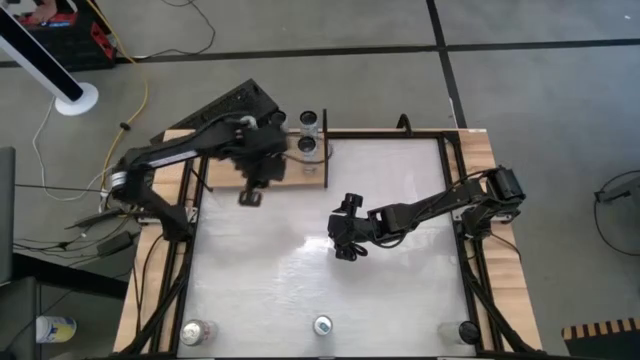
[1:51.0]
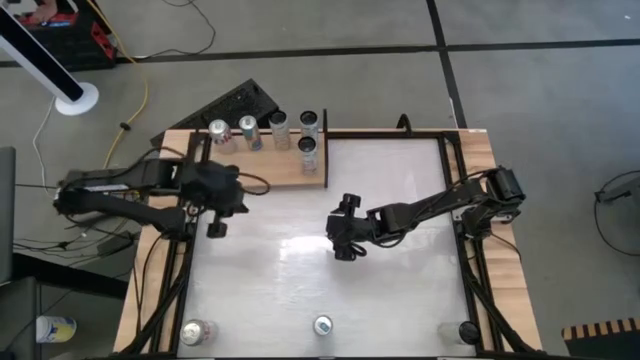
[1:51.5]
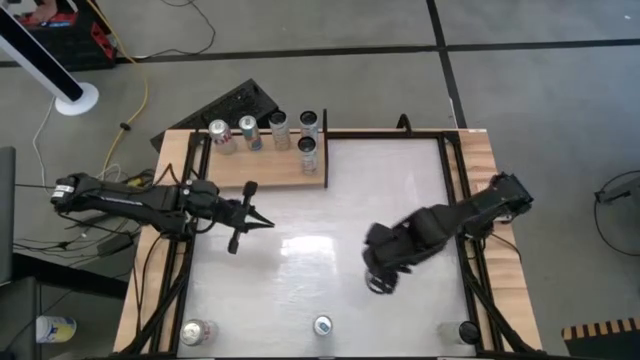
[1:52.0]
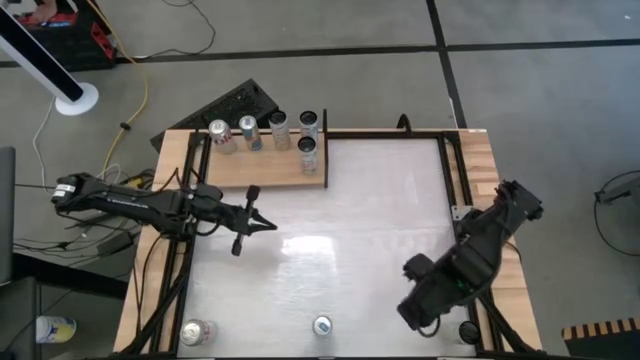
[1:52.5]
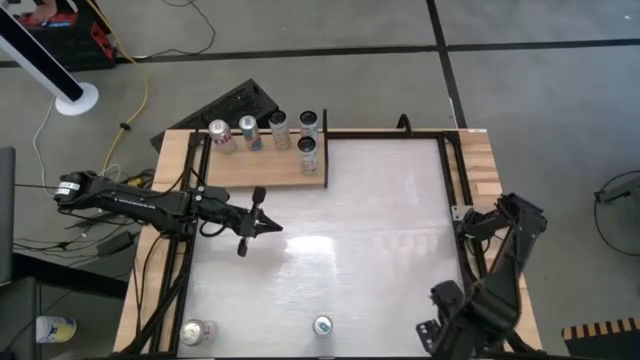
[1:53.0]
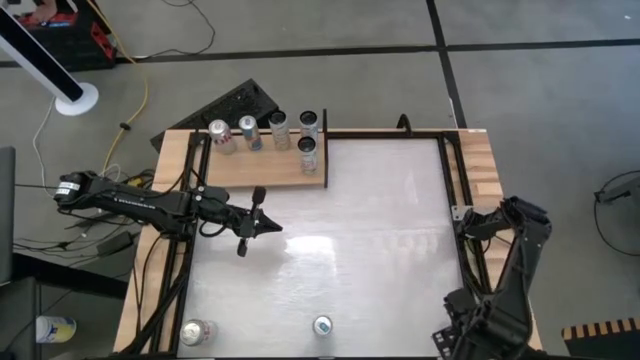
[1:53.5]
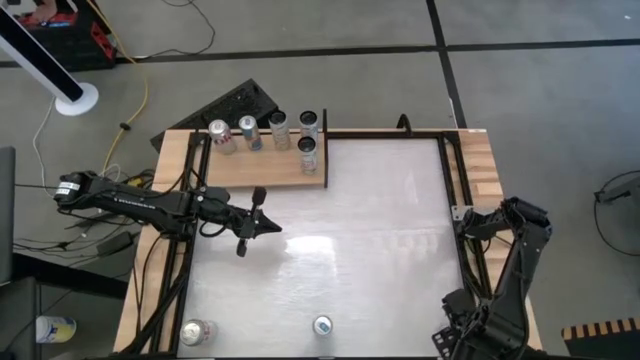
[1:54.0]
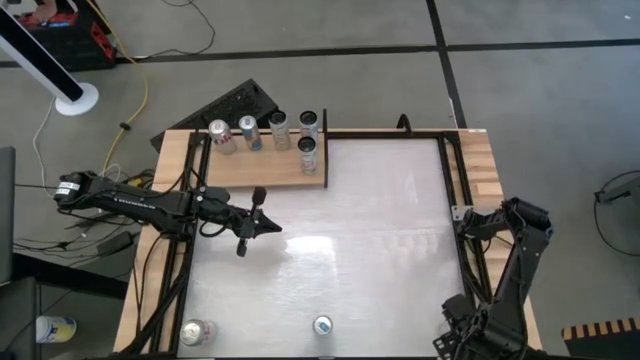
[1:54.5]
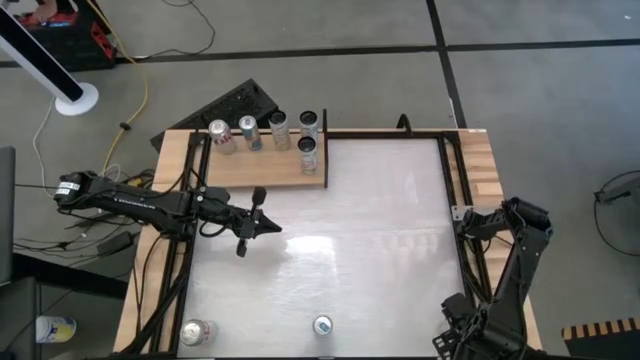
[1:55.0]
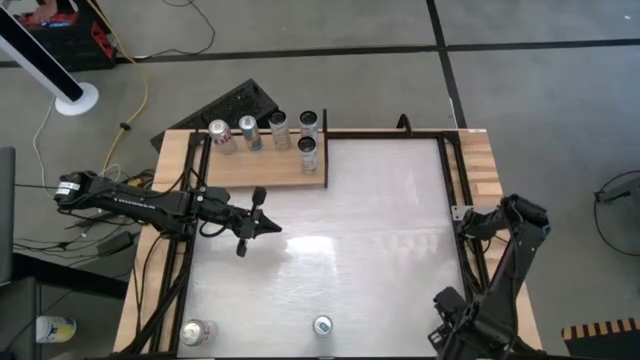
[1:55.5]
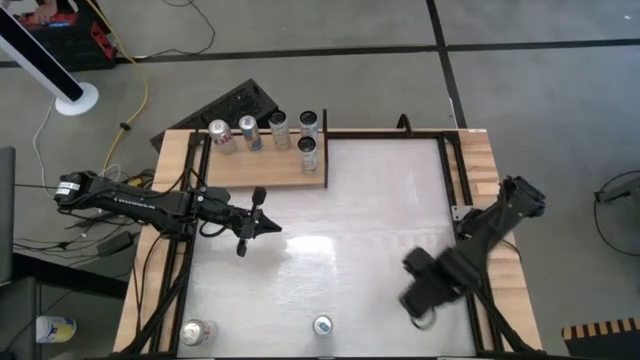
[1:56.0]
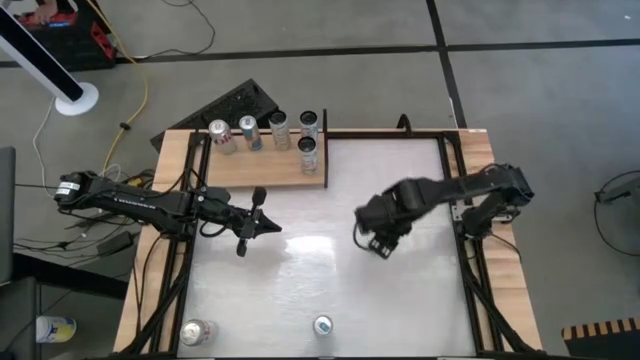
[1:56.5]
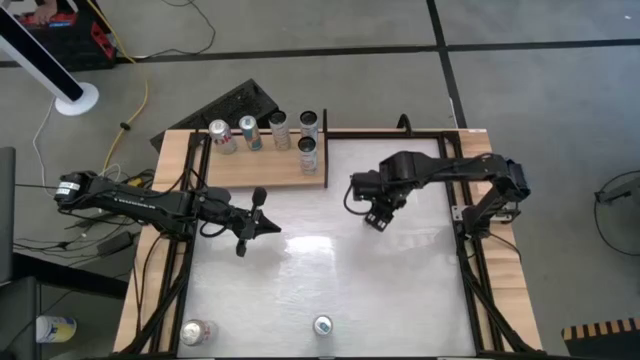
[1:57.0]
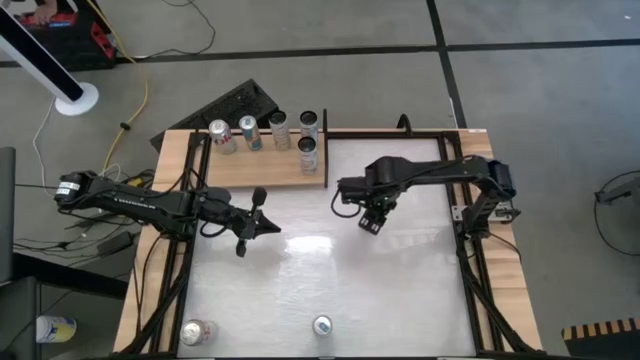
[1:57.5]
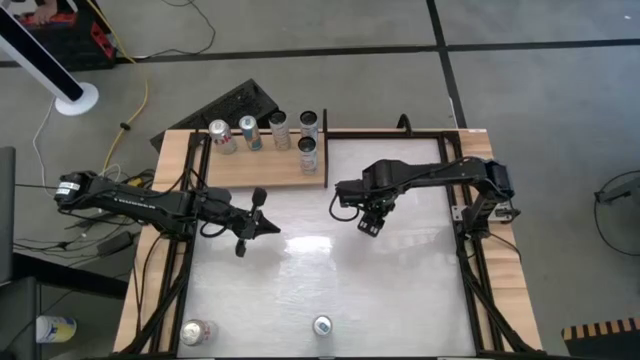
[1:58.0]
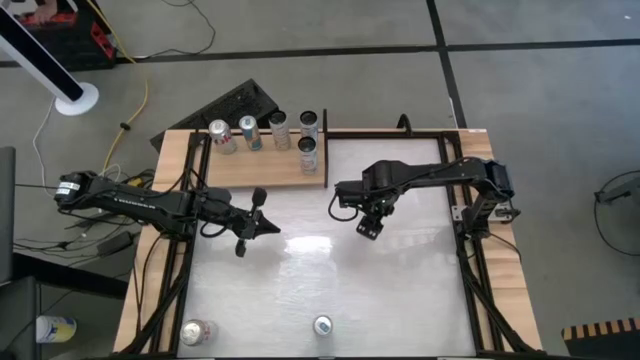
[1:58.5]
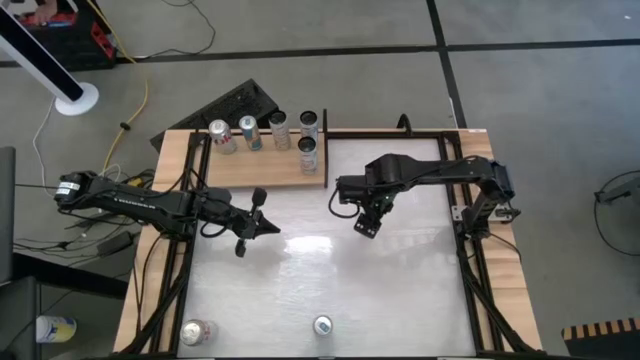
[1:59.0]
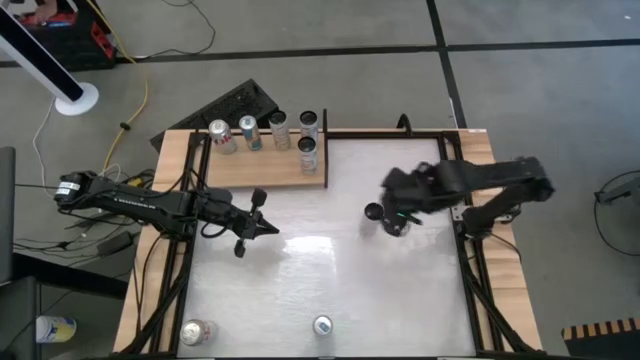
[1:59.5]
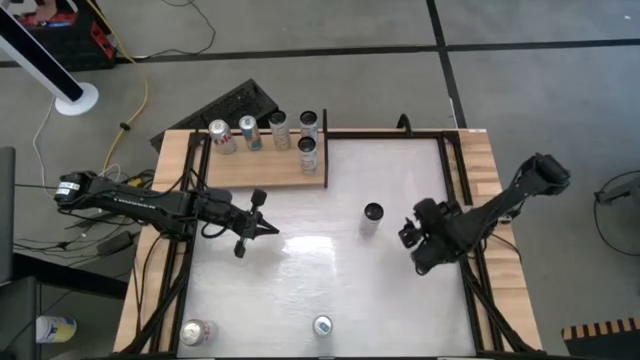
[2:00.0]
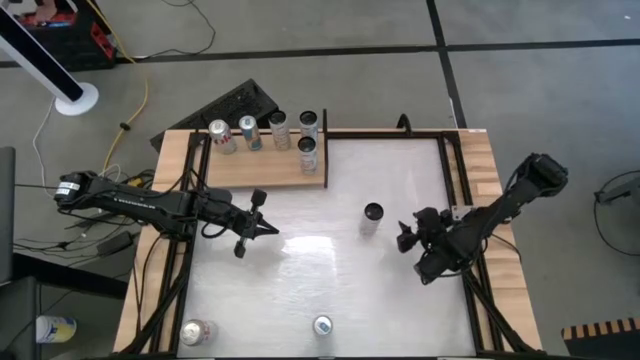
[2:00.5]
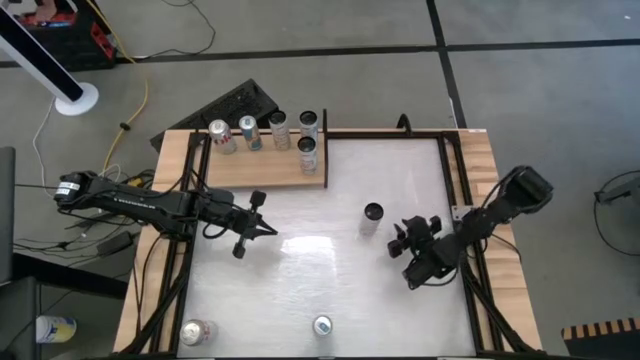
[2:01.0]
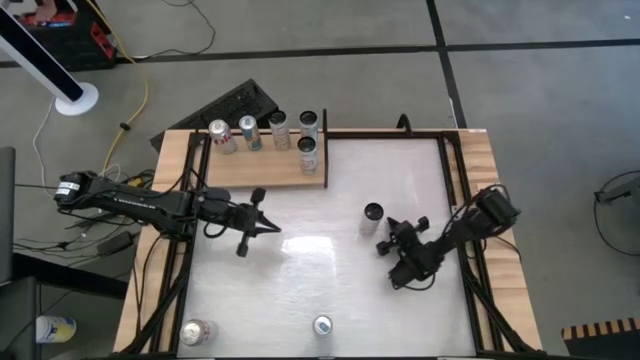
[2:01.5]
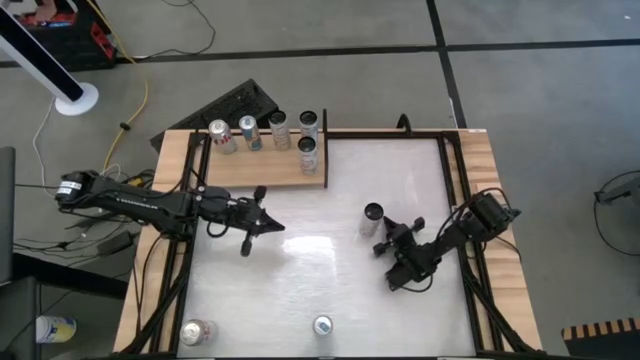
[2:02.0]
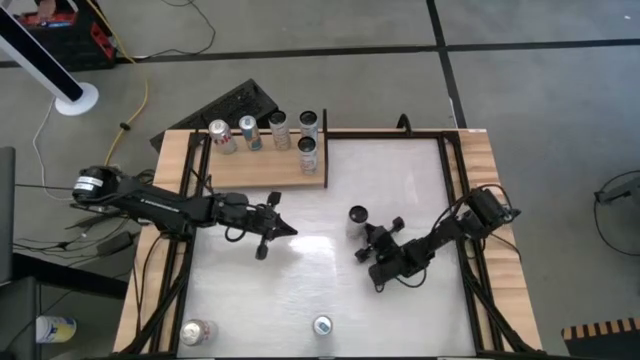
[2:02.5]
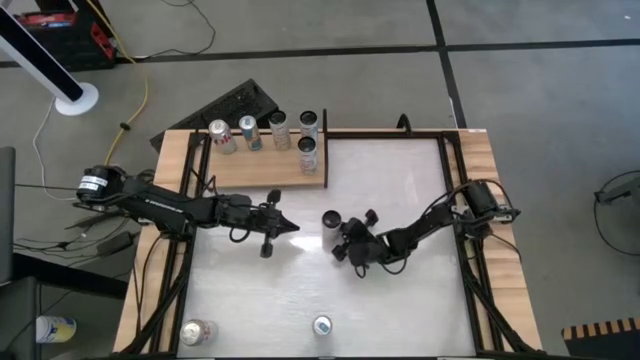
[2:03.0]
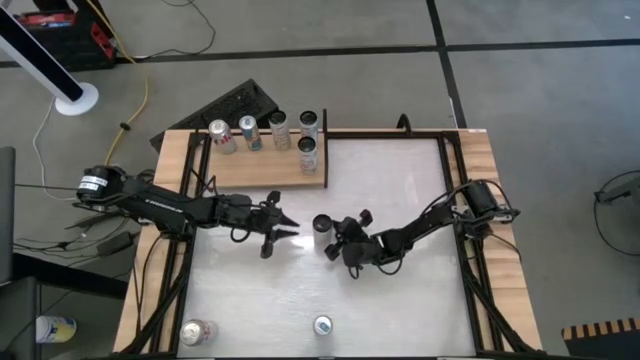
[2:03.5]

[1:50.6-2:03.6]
Task: Place canned beverage on shelf
Put the tropical vibe celsius soda can aligned with the other tropical vibe celsius soda can on the shelf

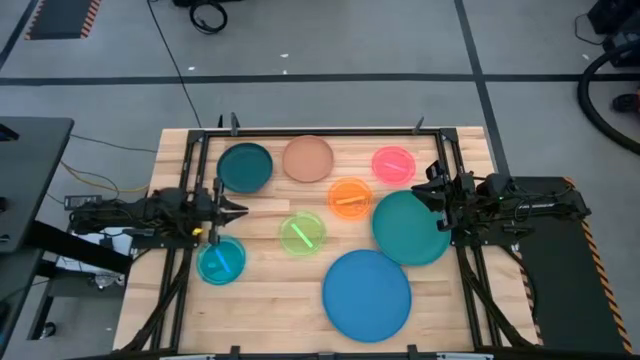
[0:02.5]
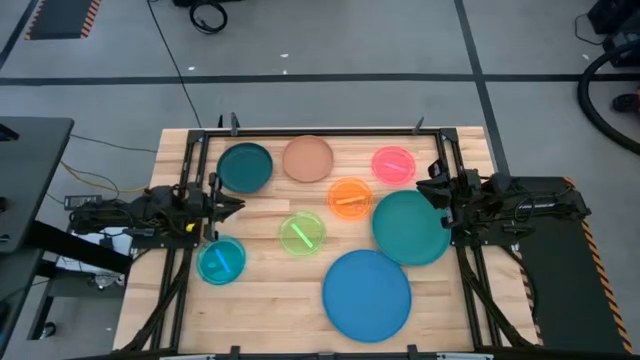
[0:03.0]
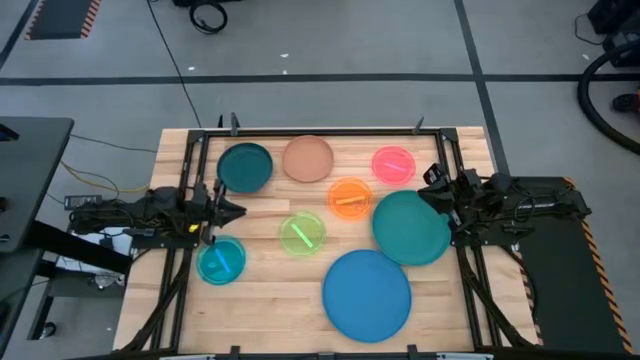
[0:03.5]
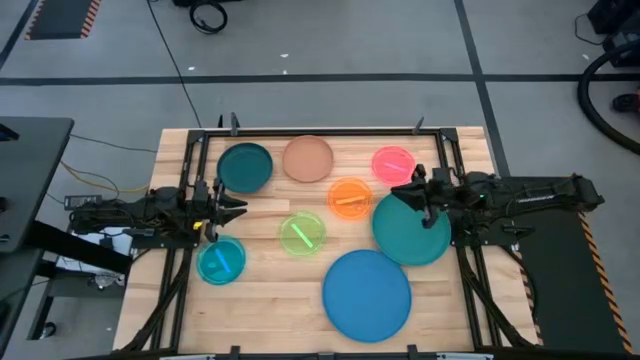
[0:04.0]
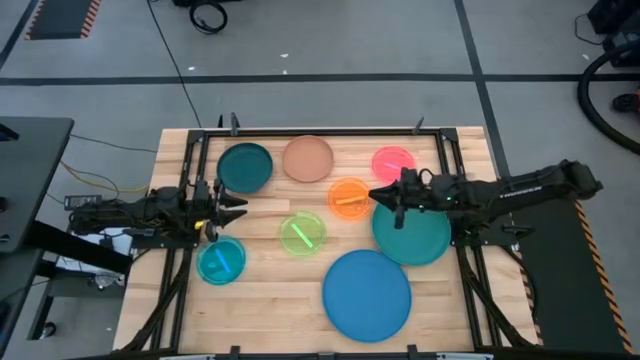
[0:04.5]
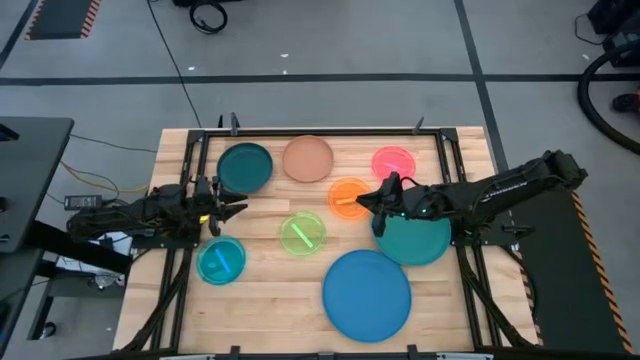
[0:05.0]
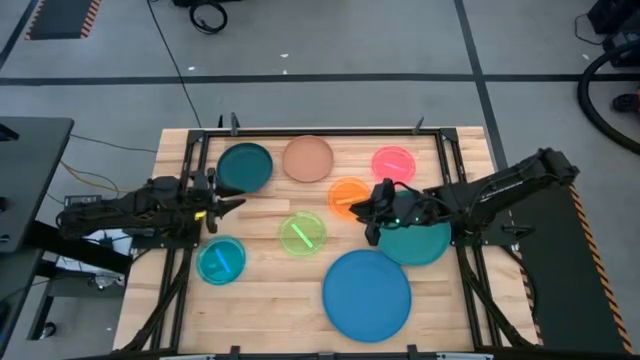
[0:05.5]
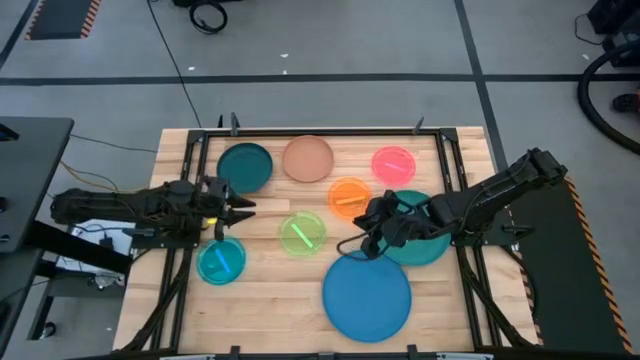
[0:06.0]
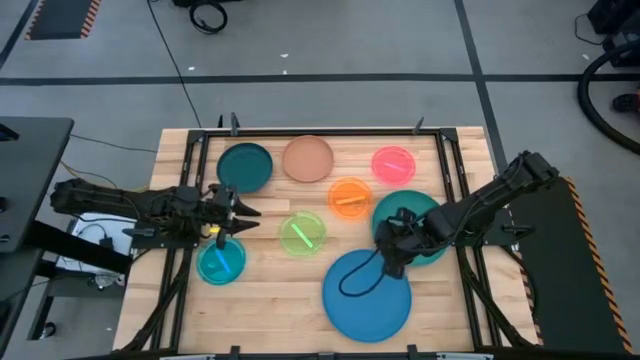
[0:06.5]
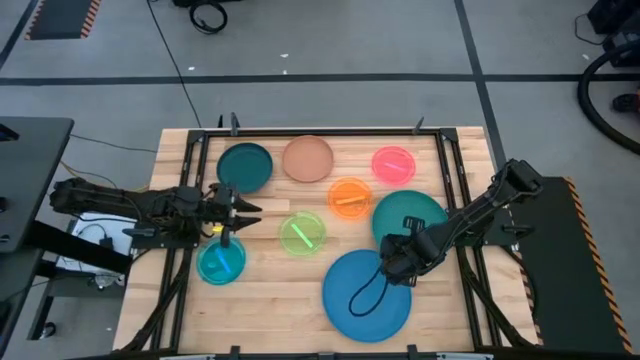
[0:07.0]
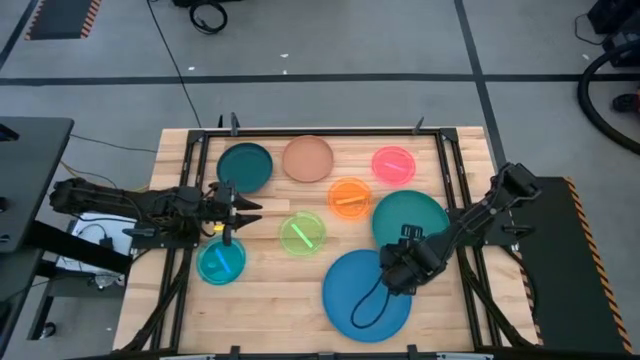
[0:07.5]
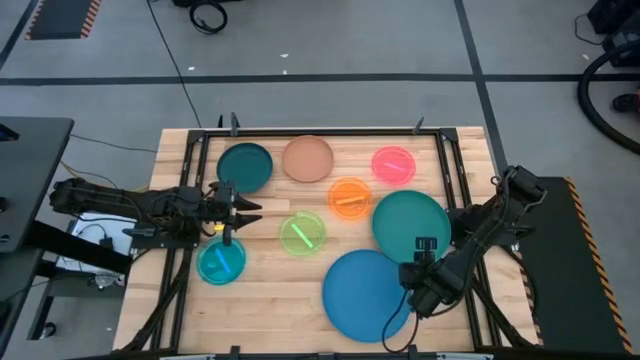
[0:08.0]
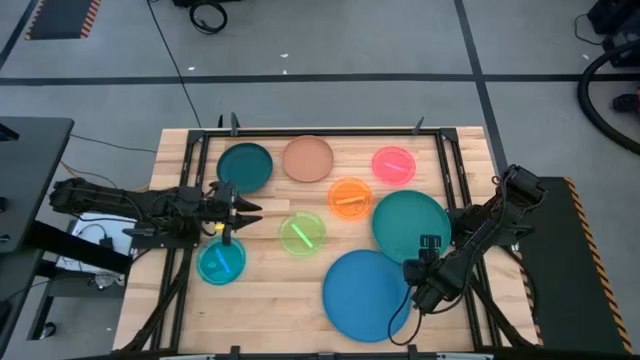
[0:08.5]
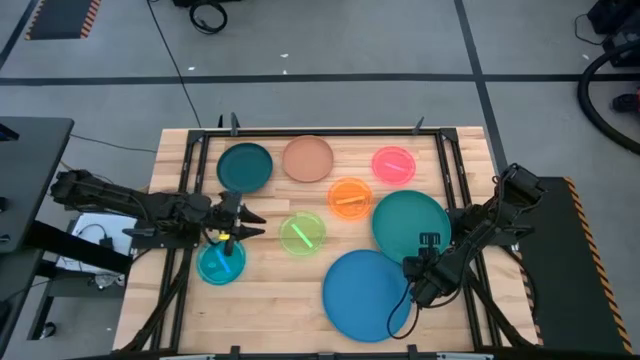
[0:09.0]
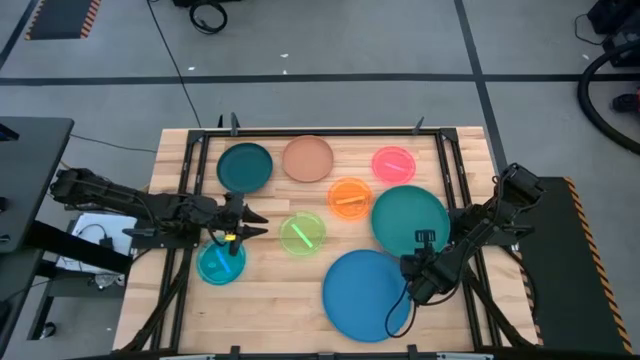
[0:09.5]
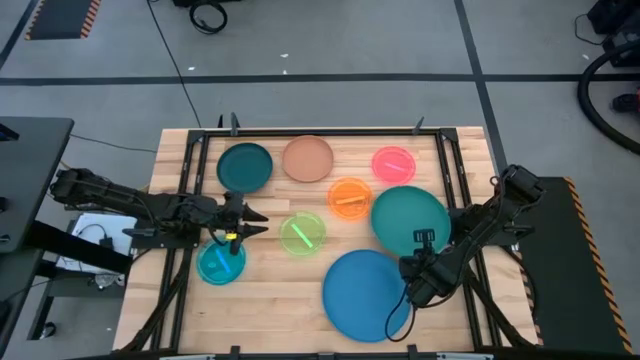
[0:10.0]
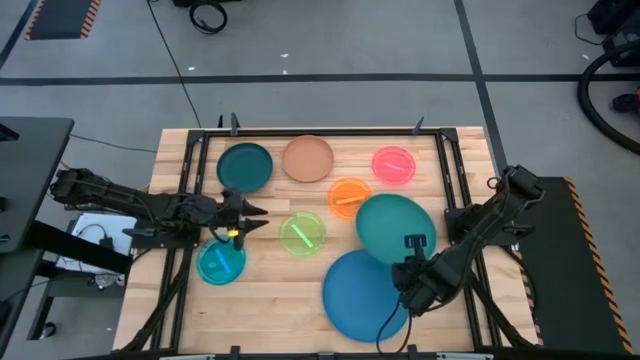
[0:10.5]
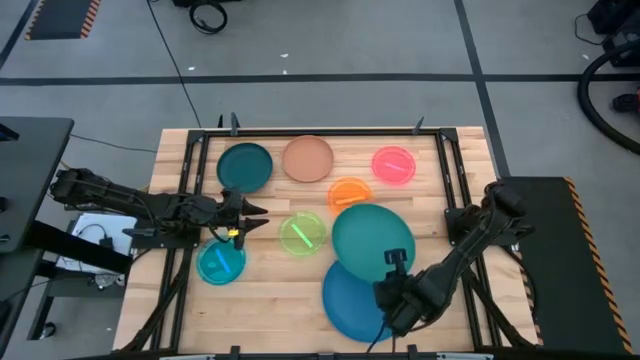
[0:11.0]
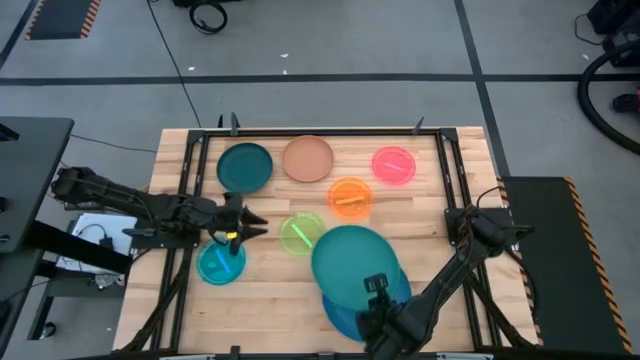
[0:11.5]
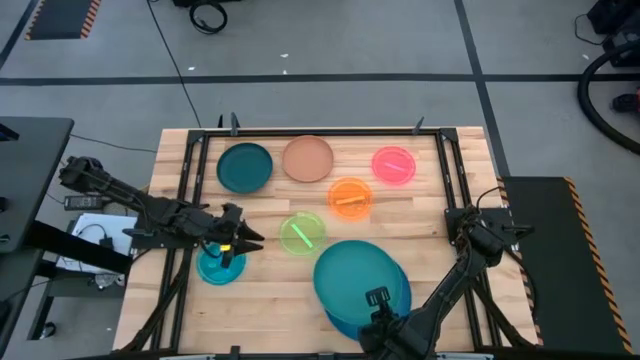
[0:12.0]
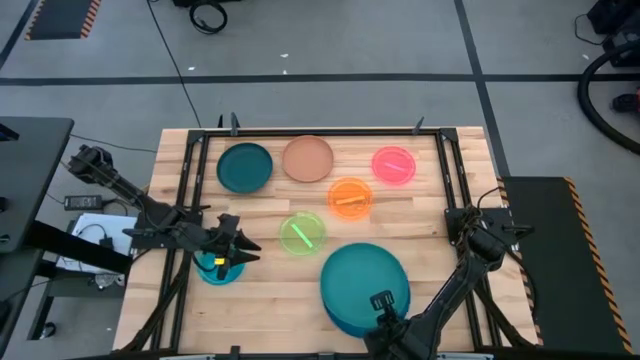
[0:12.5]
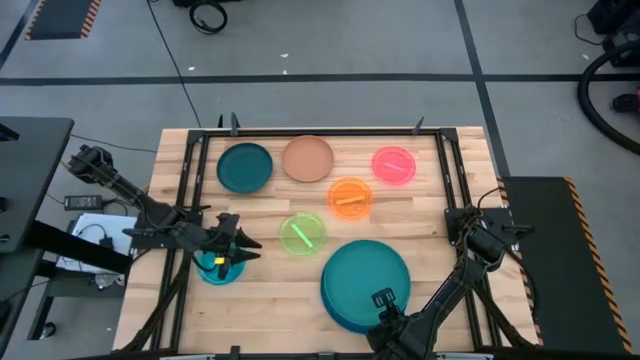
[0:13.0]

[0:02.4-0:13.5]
Task: Stack plastic plates
Stack the green plate on the top of the blue plate
